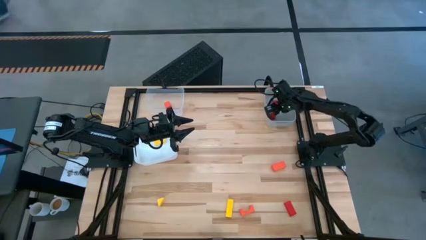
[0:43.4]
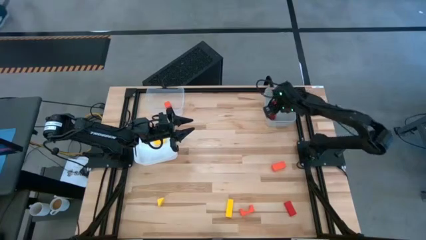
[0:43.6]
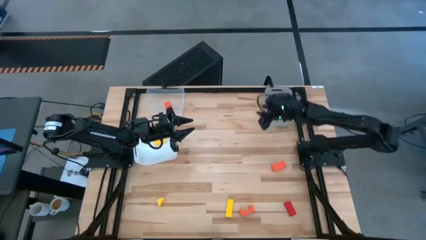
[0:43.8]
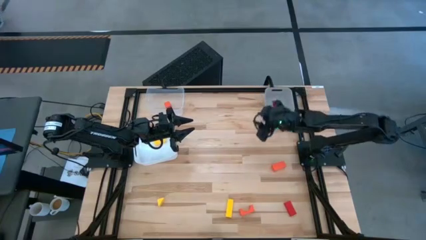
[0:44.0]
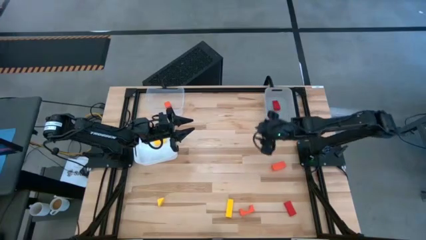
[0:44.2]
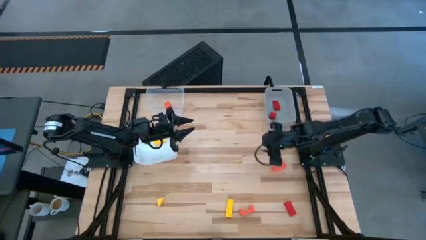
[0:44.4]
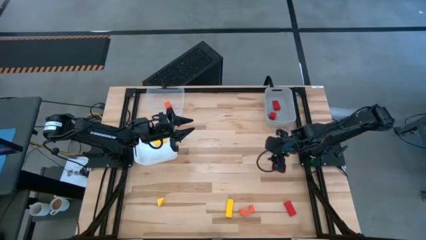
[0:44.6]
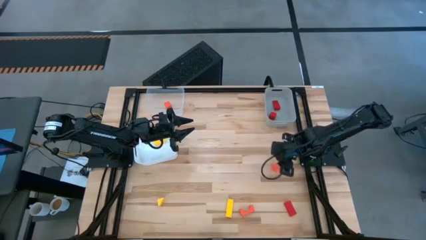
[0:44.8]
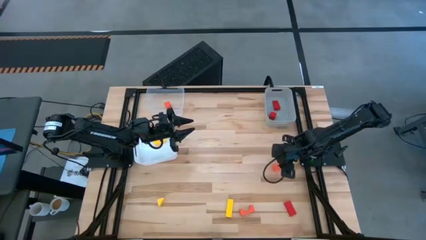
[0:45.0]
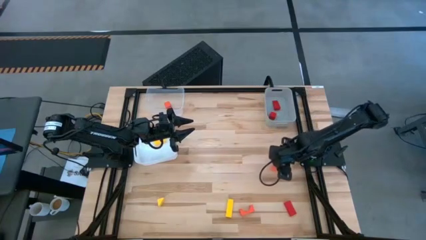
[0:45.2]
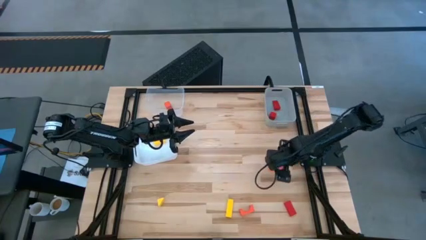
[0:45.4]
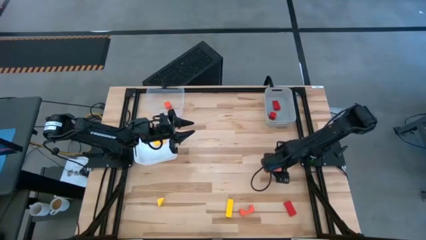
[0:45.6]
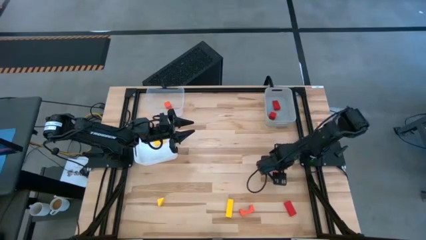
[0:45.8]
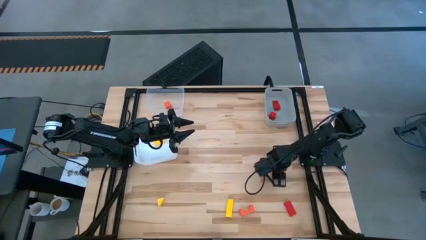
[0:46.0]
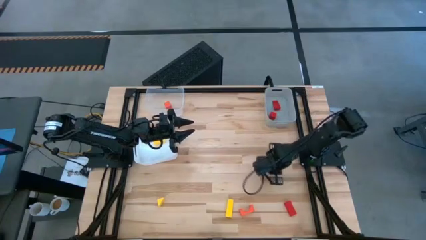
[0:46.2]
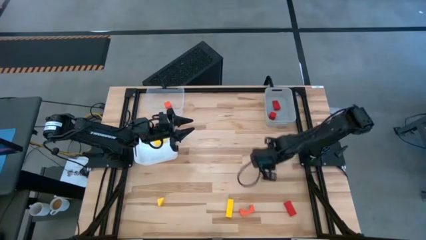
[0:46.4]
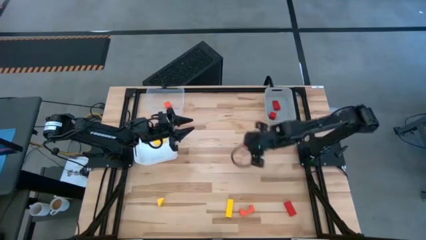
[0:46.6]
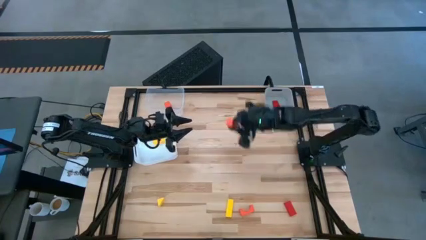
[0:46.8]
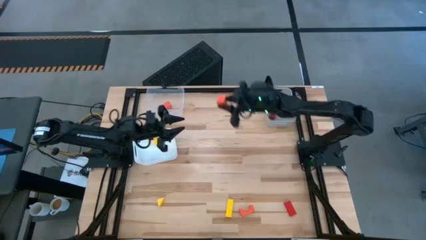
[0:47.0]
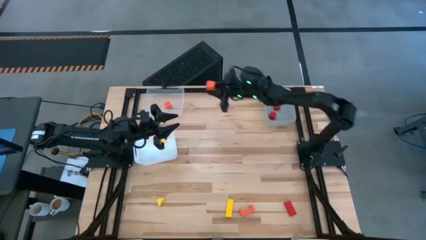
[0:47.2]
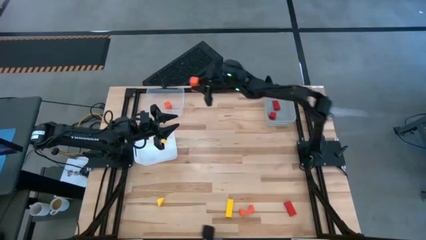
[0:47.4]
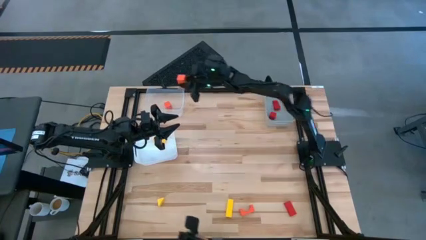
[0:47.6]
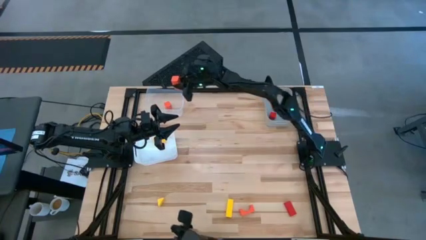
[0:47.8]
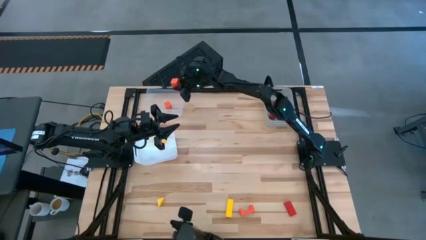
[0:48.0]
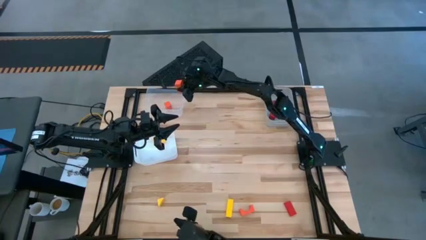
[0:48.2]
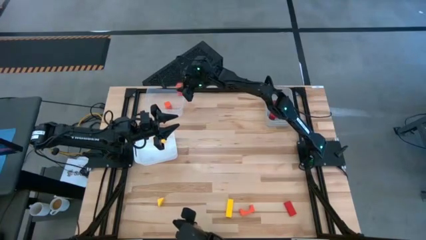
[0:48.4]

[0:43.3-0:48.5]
Task: Sort & place blocks by color
Put the top orange block into the transparent bin

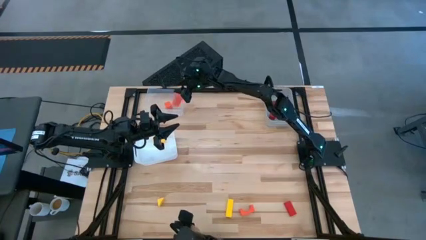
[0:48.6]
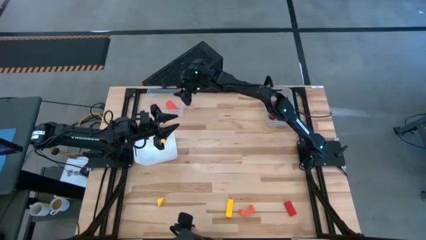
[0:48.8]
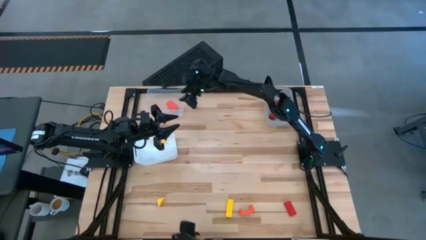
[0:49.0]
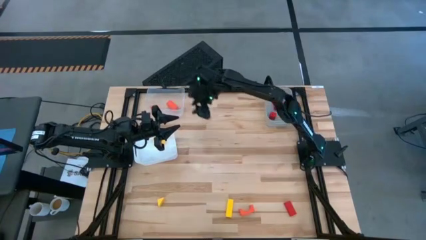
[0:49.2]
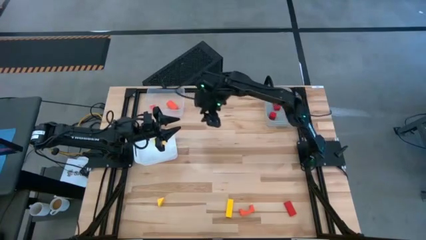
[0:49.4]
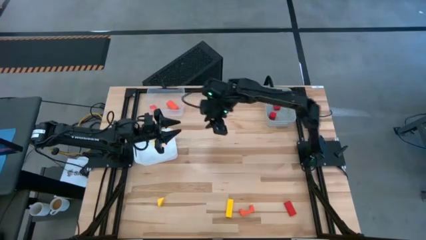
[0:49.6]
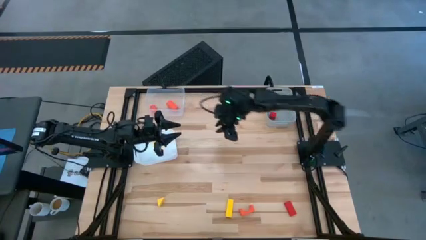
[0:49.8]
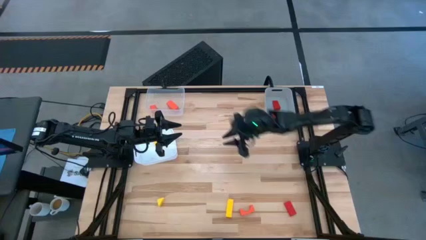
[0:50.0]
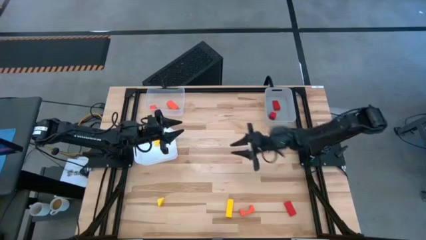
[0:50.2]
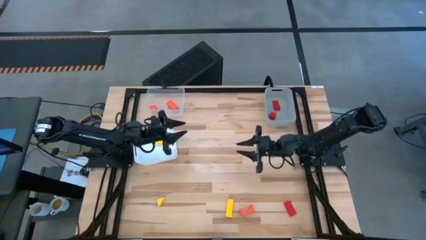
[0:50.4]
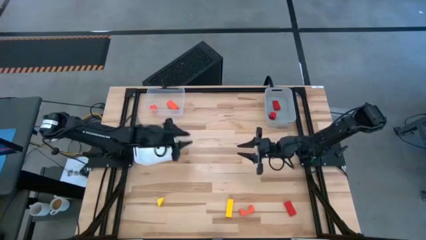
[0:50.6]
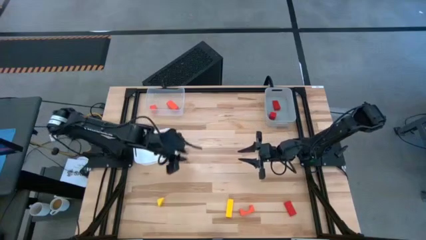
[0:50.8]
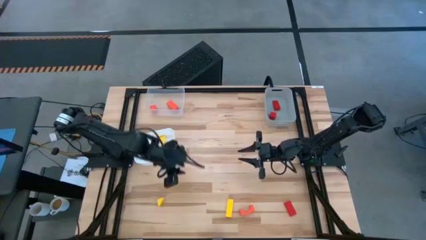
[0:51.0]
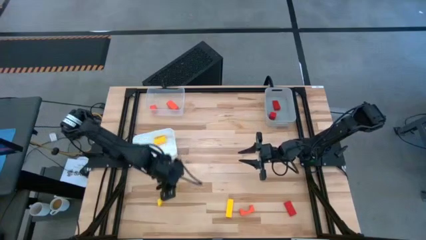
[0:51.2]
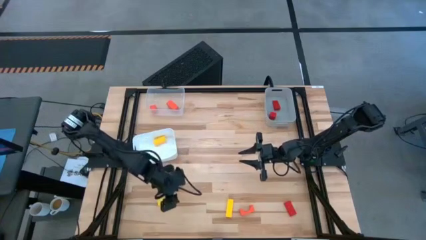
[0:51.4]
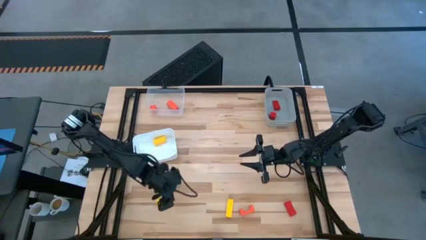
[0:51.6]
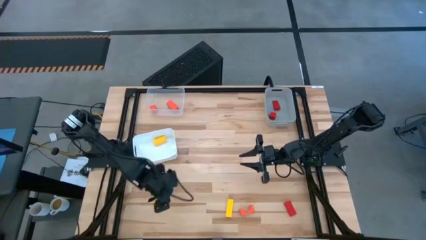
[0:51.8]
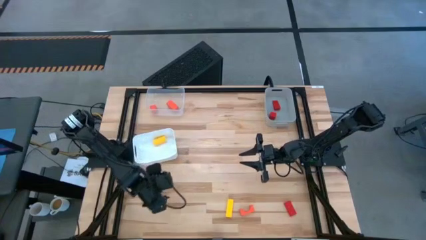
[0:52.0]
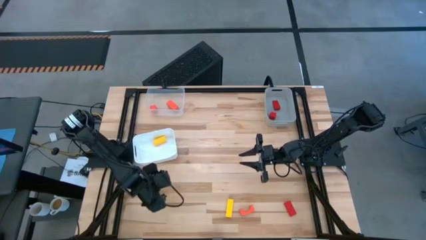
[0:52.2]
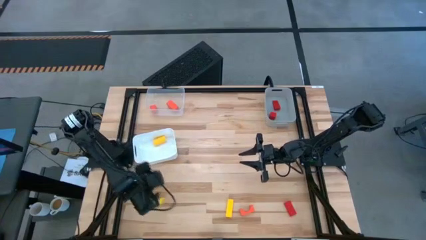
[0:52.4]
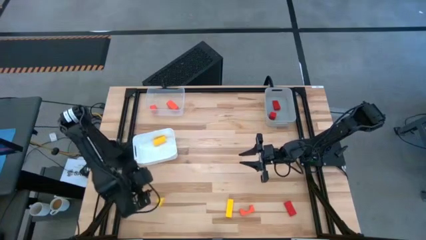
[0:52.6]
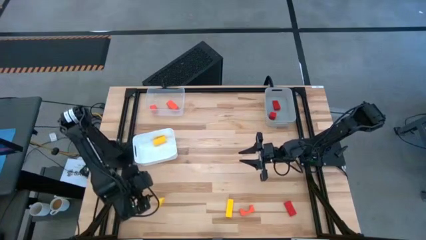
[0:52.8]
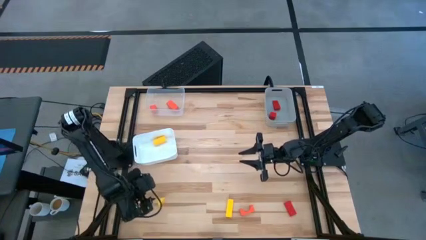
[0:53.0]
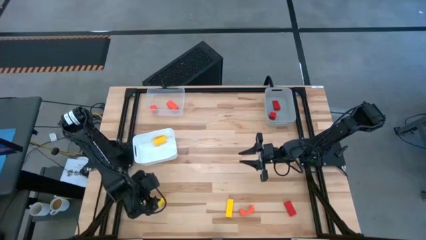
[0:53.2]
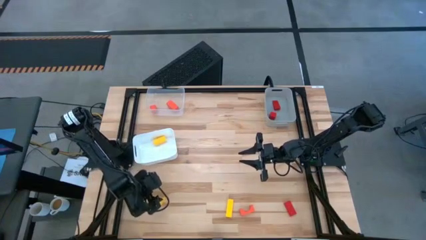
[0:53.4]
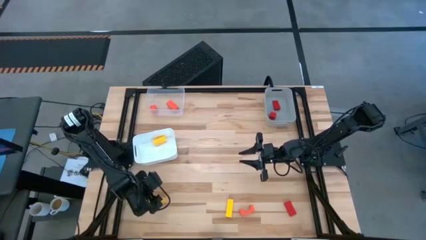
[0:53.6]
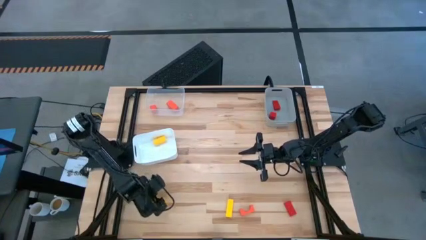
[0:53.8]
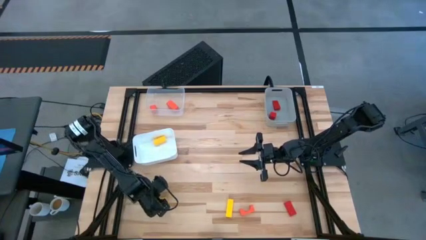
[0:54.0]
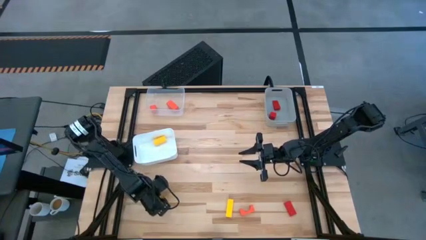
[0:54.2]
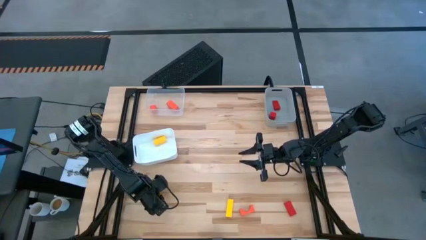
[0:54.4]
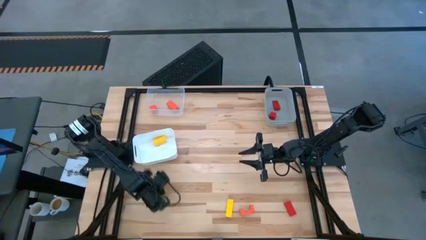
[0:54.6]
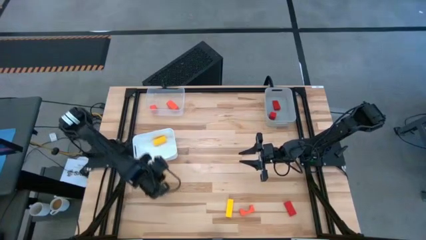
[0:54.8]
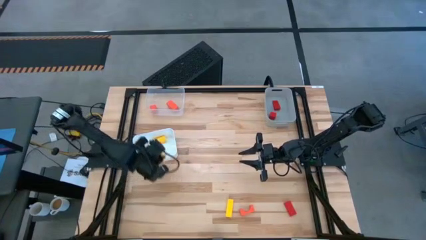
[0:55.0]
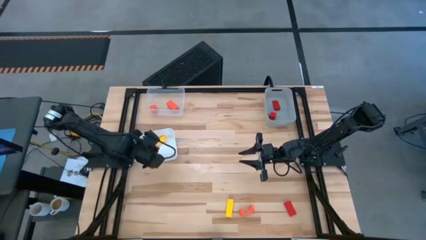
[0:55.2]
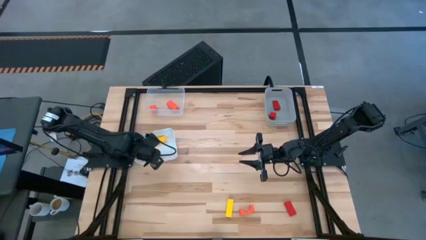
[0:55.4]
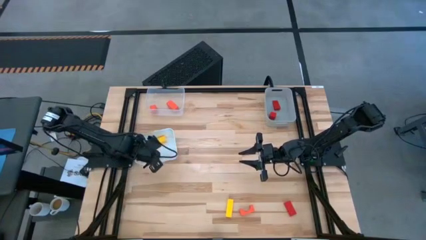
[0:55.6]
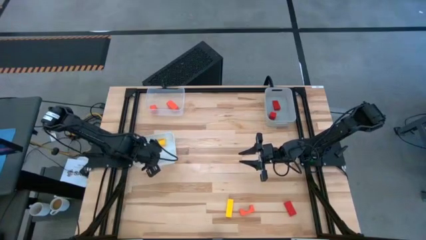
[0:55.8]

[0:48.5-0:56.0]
Put the left yellow block into the white bin

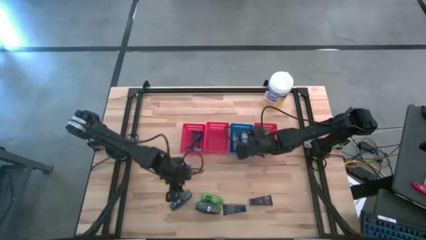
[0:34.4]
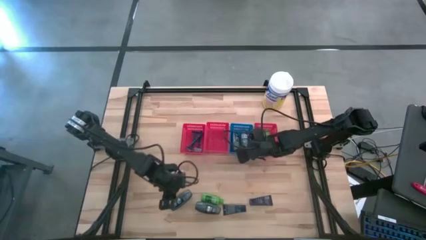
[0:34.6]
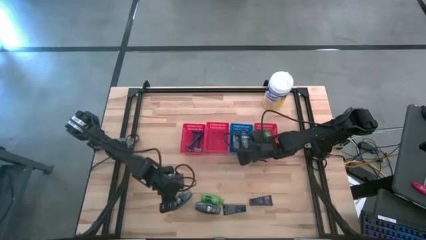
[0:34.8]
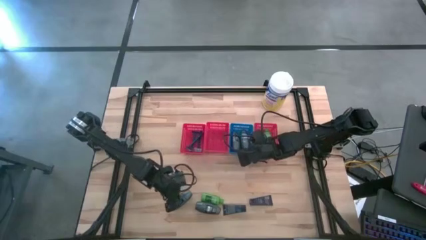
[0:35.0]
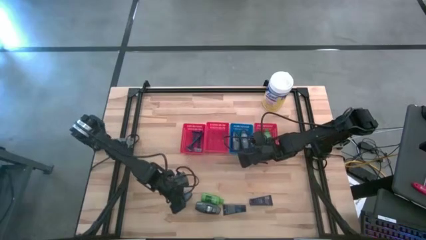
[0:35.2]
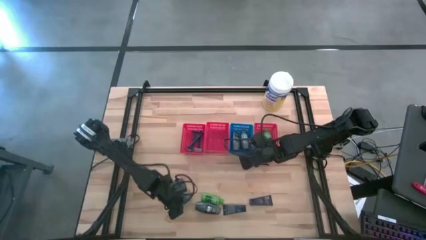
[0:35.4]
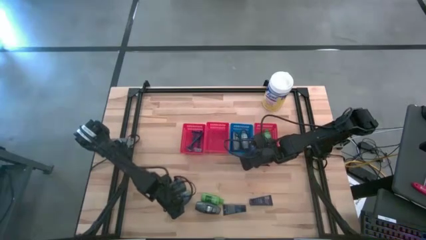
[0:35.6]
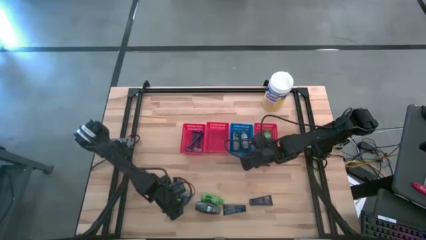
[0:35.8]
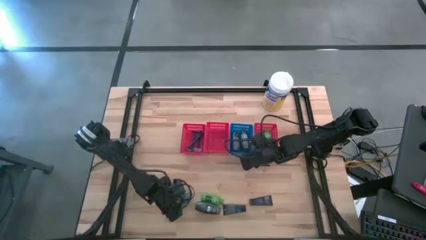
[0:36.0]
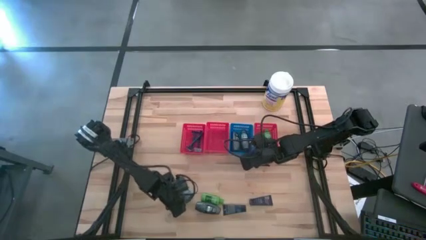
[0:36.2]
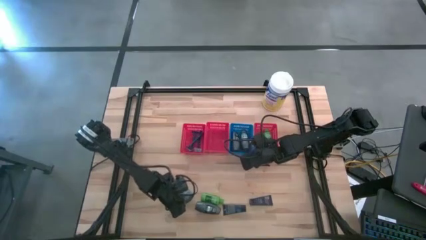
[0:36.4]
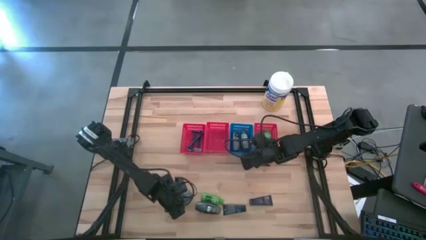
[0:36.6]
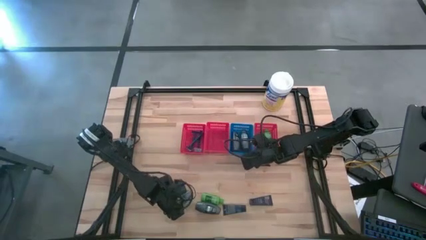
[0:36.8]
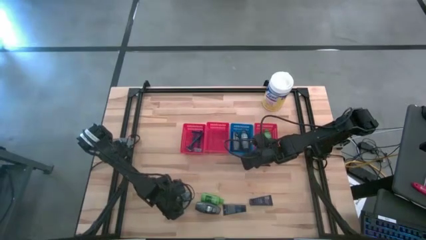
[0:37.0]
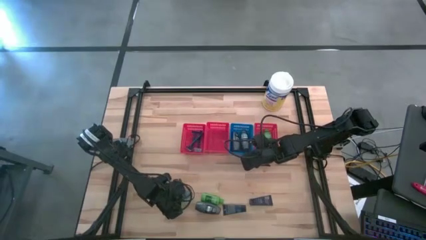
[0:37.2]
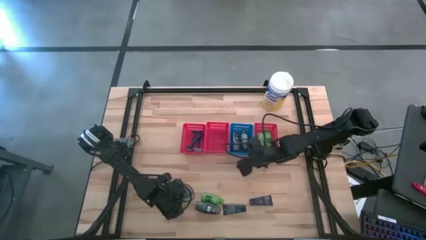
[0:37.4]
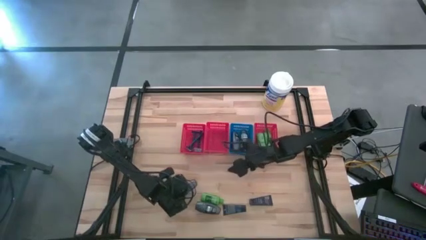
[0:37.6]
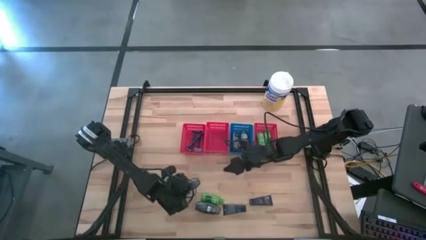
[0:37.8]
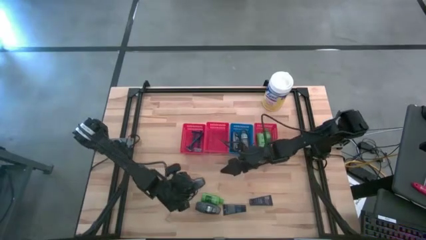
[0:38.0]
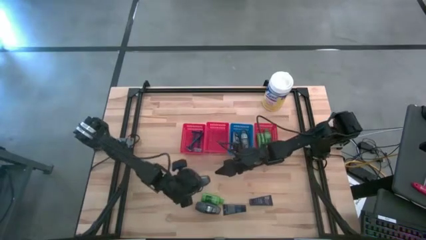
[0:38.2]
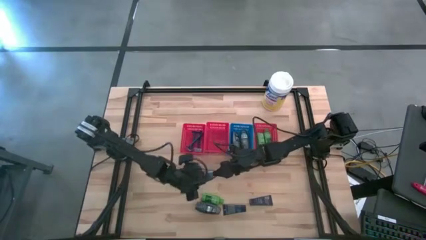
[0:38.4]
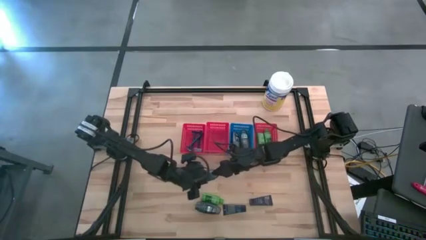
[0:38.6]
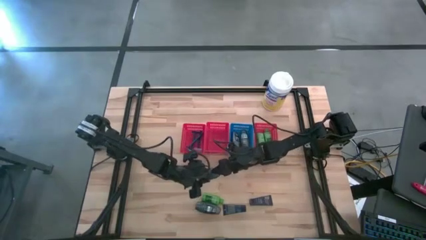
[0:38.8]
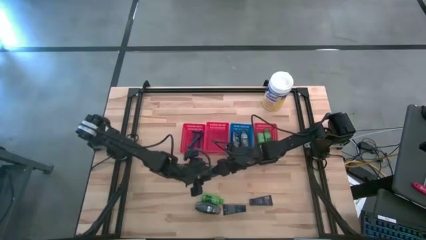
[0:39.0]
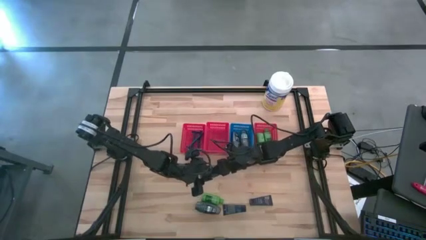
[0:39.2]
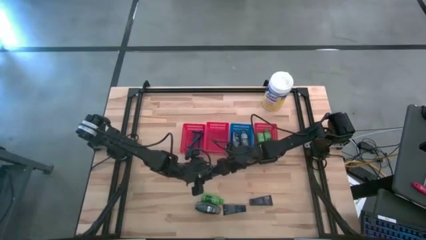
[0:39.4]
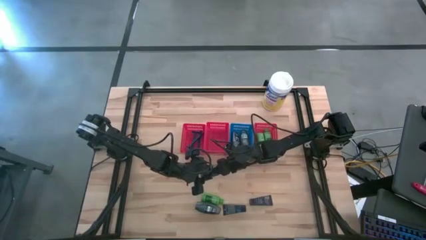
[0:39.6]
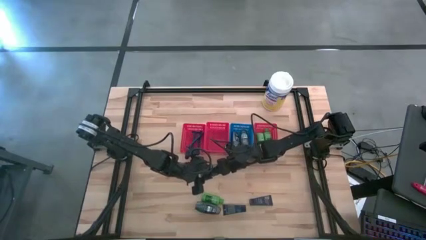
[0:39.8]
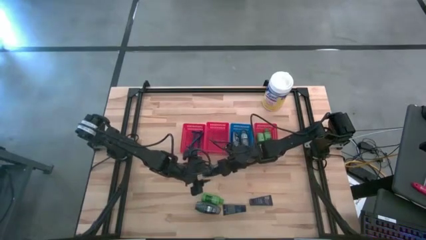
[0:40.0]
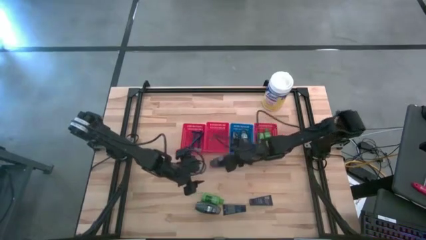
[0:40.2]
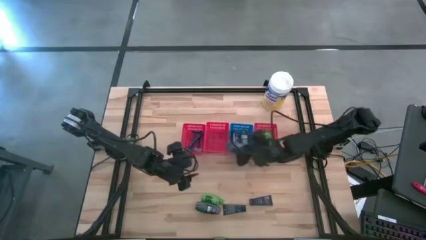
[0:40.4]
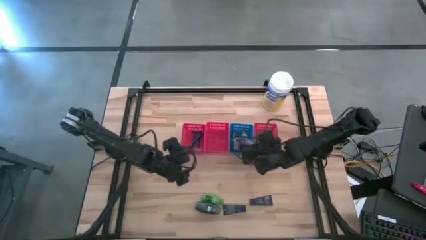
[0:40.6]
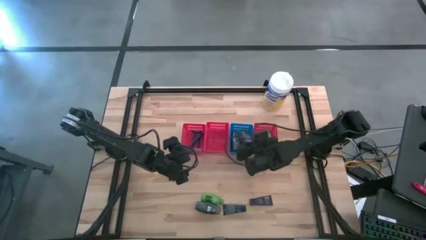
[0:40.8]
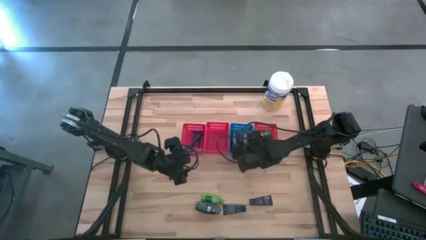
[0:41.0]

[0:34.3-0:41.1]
Task: Pick & Place Travel size toiletries
Put the gray deodorant into the blue bin
